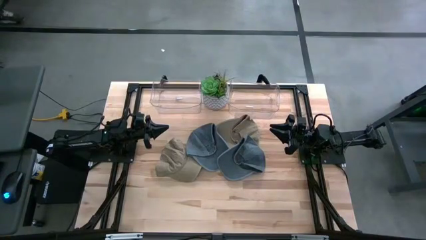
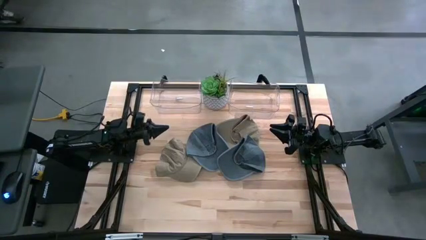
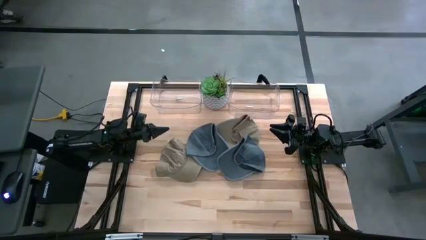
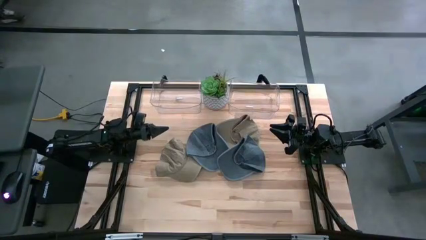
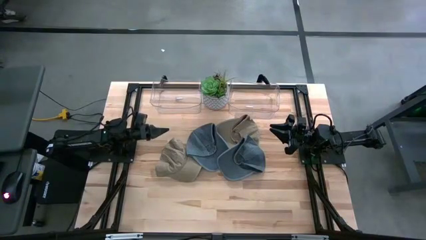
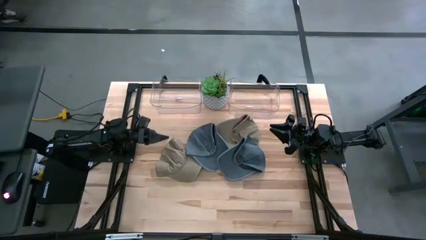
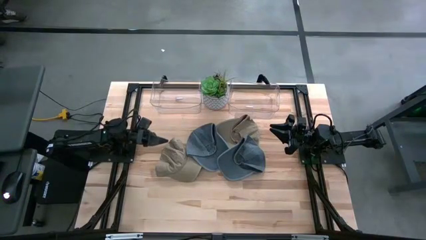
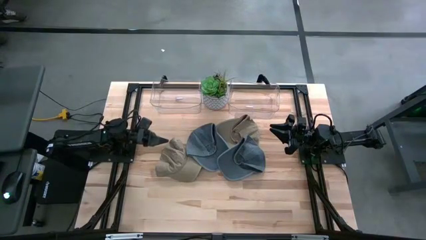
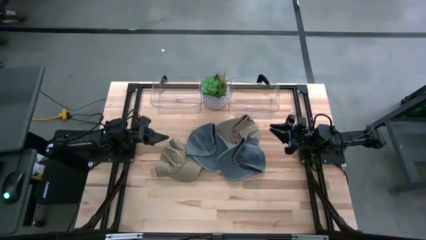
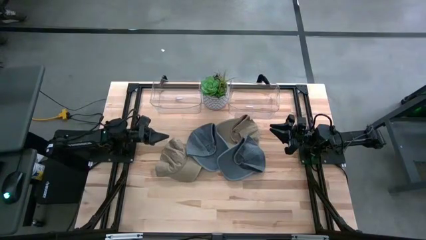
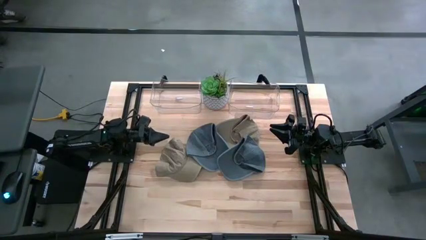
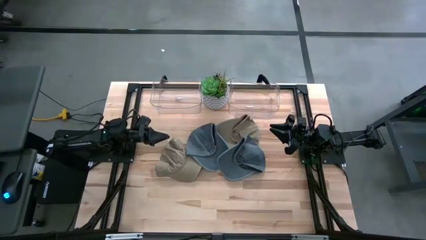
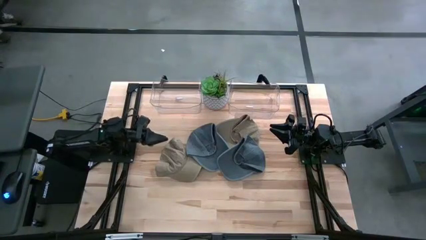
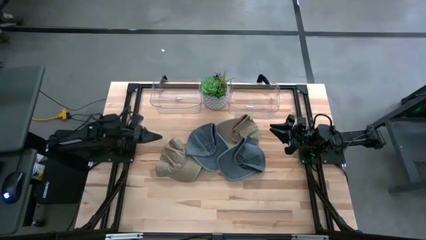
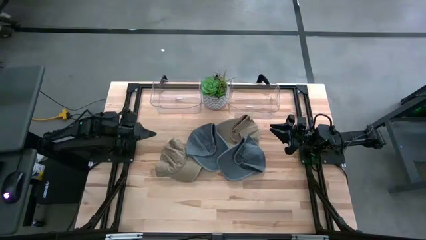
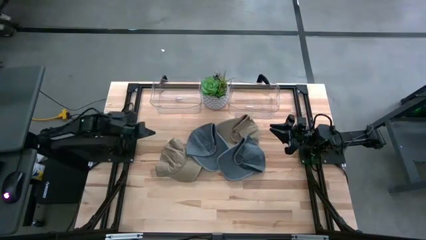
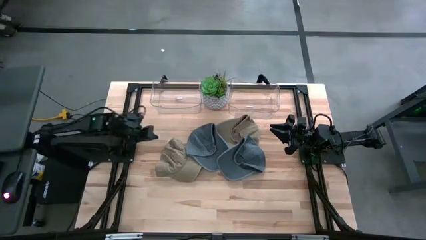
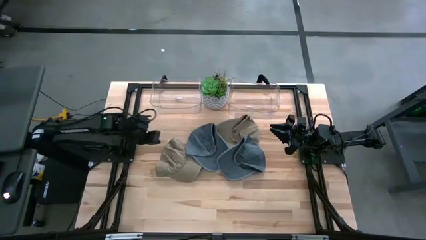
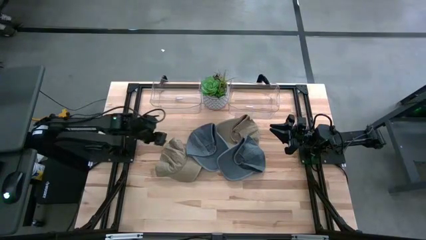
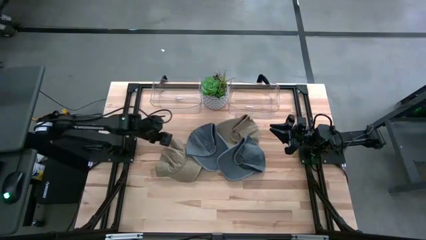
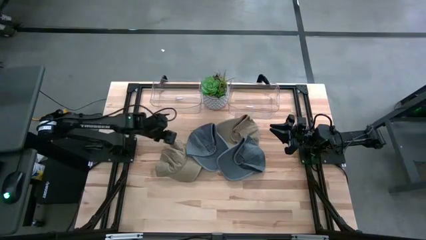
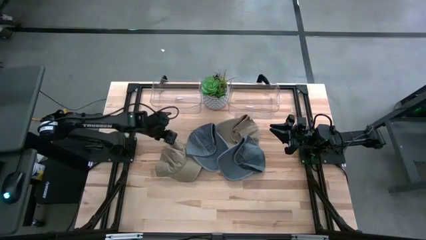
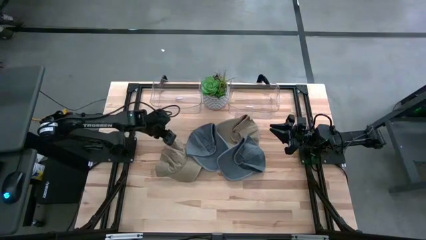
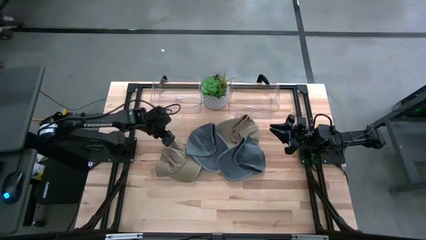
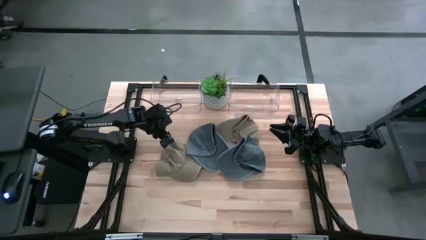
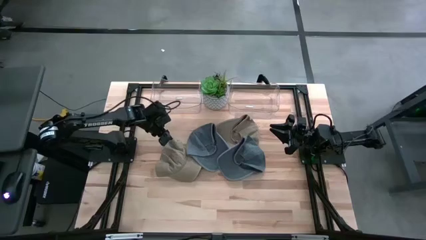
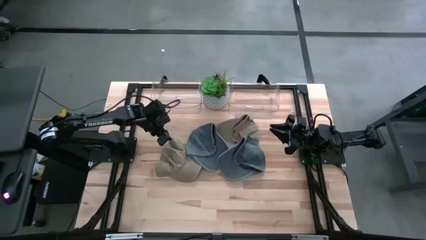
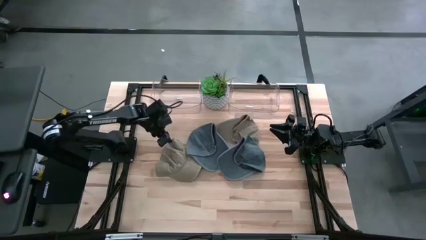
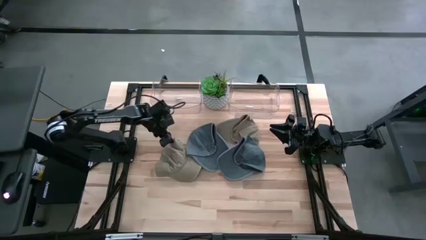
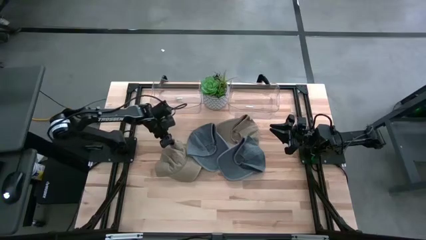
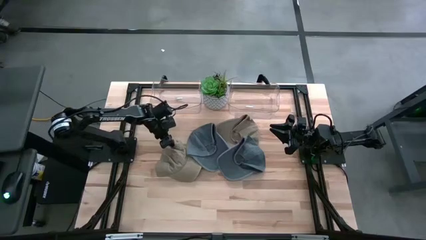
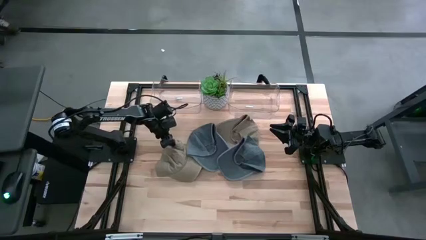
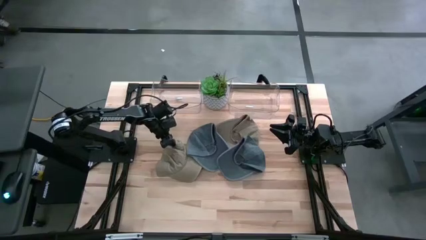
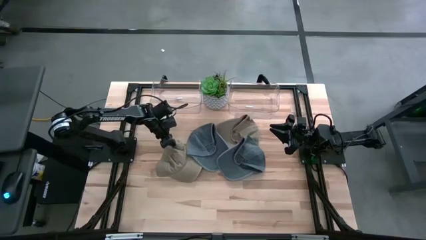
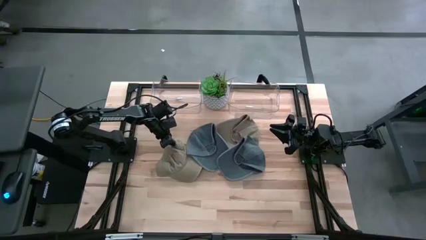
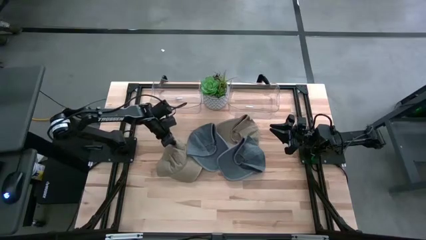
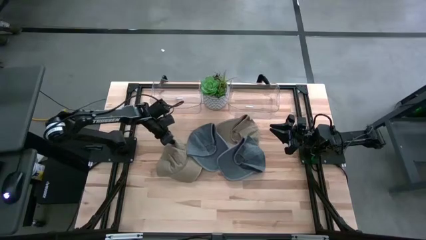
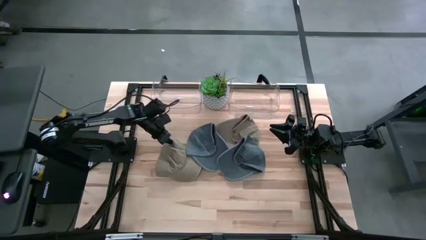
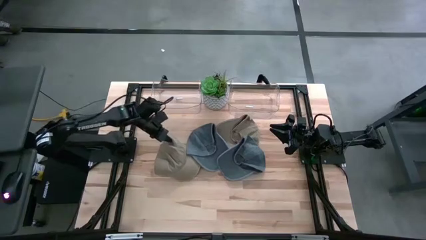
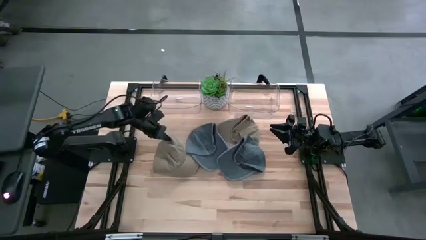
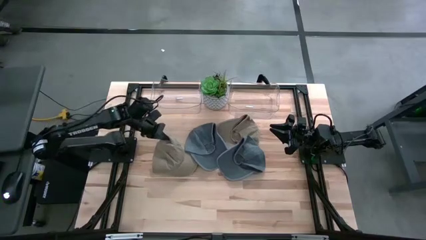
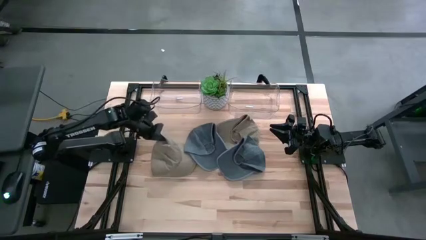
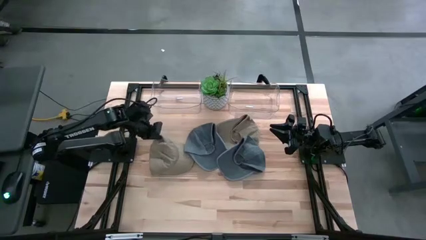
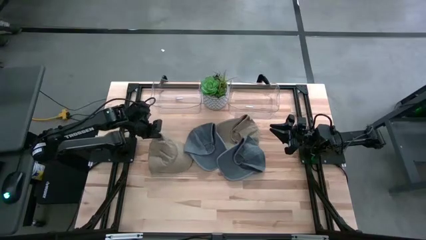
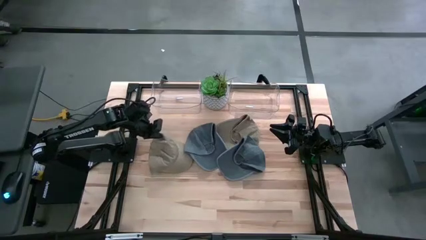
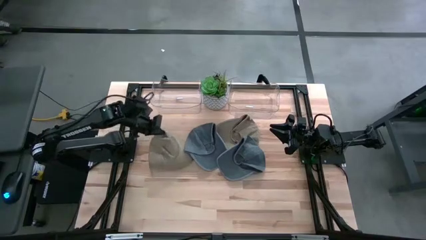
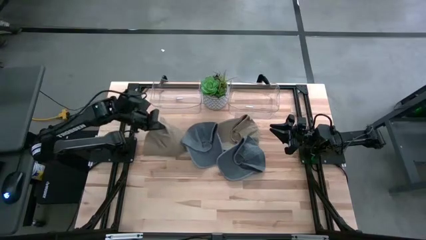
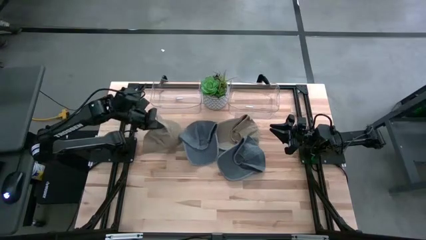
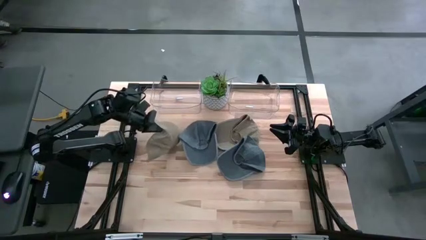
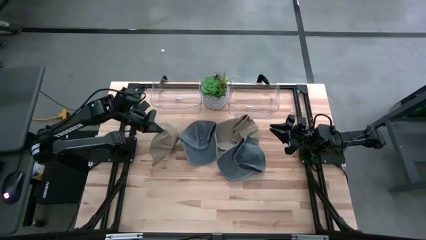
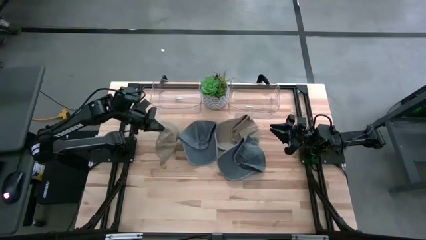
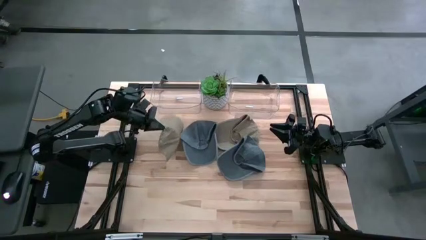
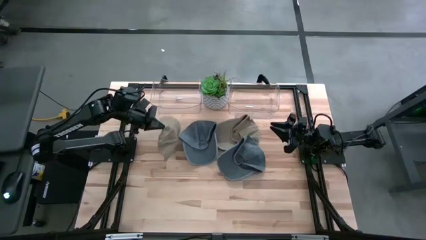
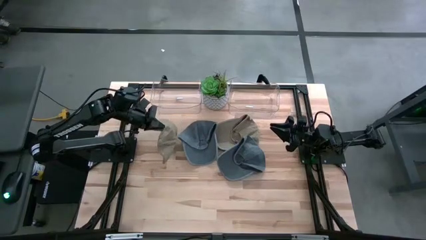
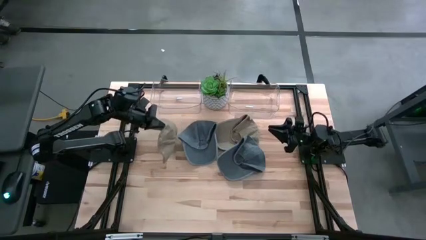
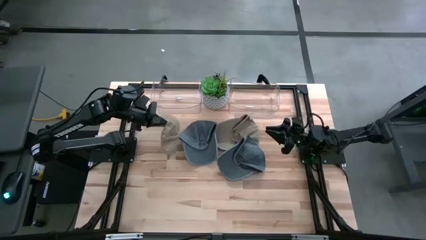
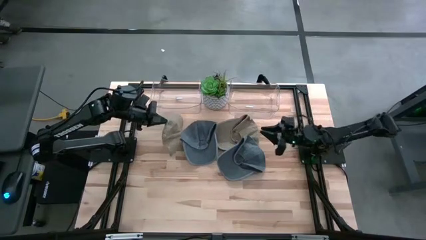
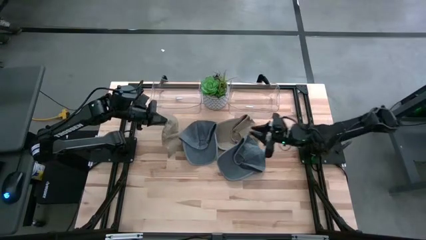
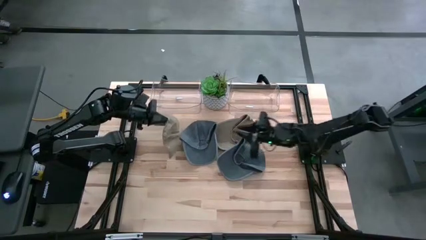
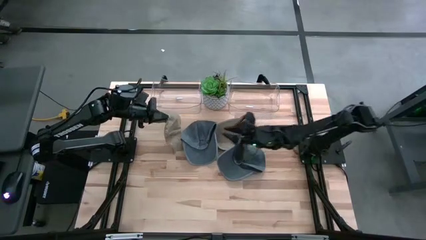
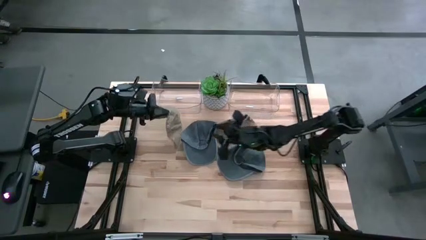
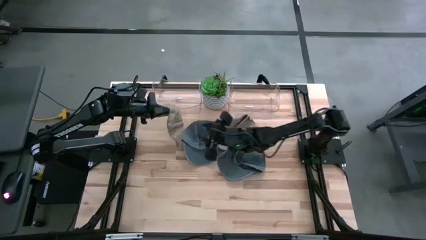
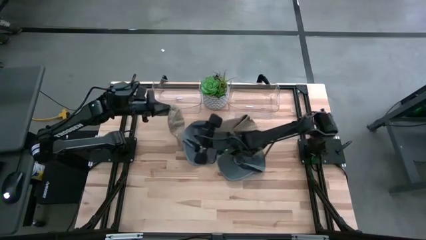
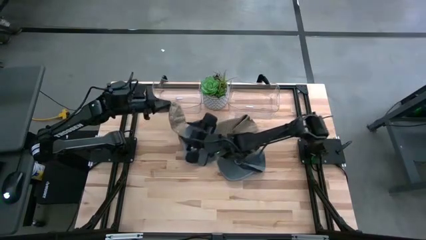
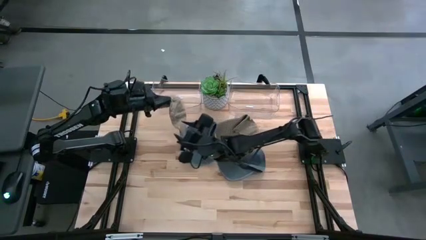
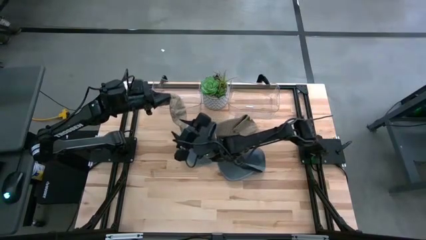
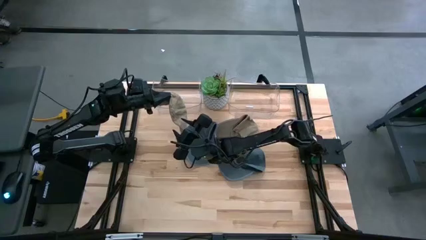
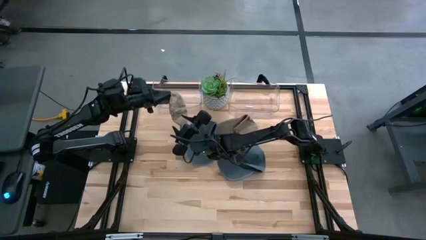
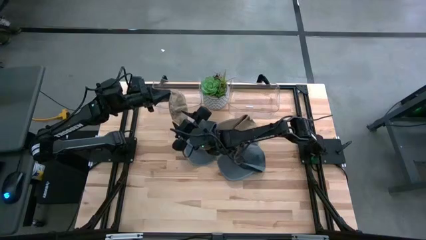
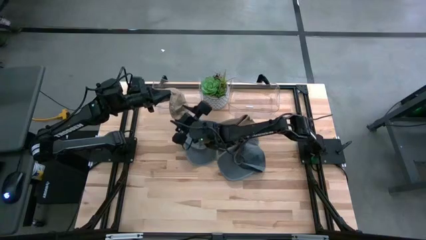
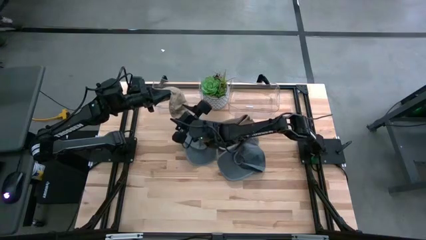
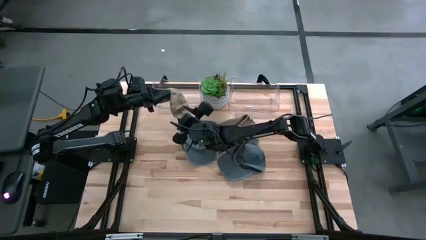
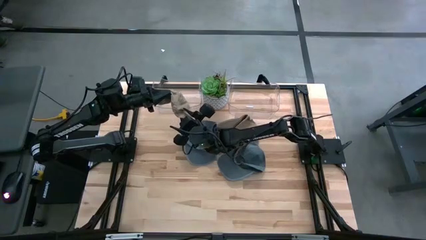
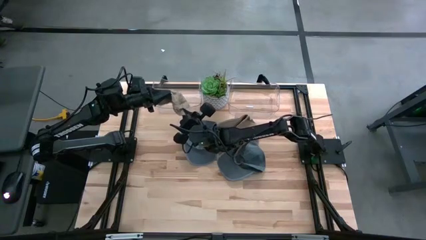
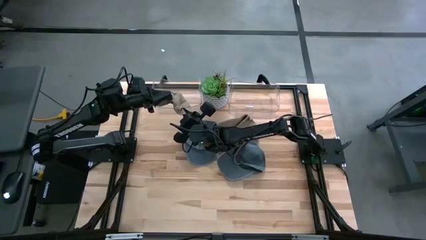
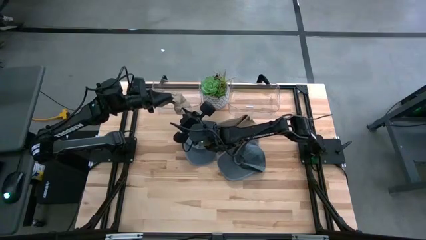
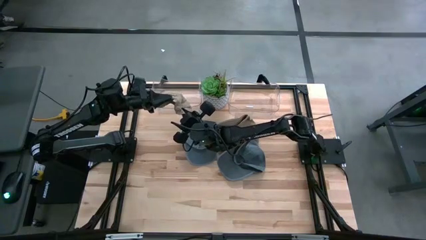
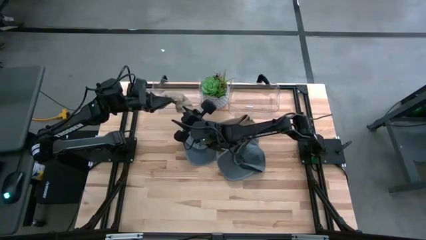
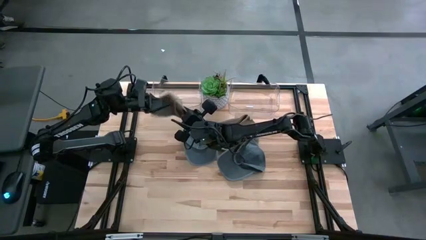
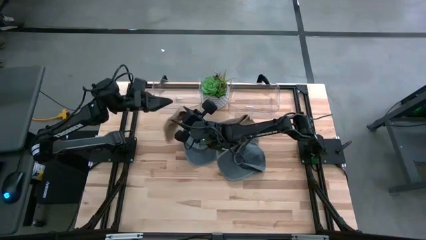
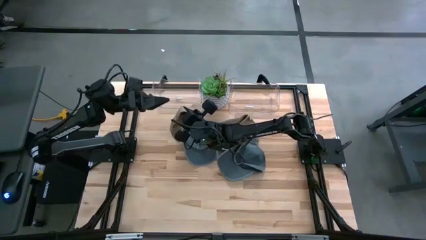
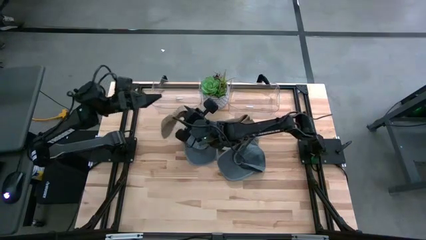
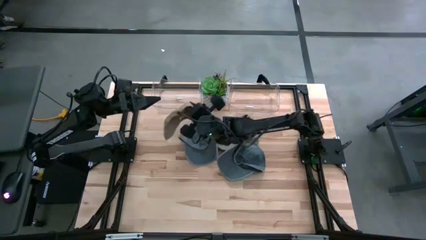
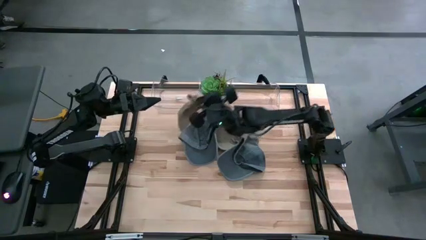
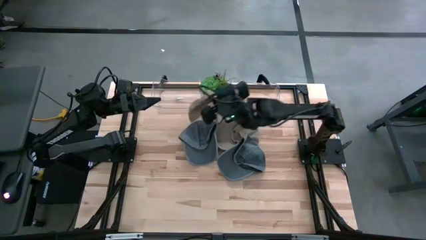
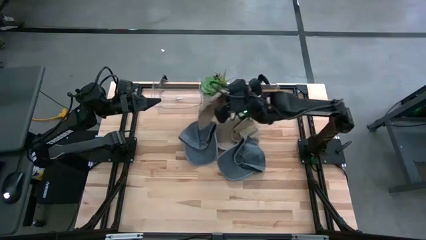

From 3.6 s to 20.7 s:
Task: Pick & Place hat
Put the left light brown cap into the right transparent bin
